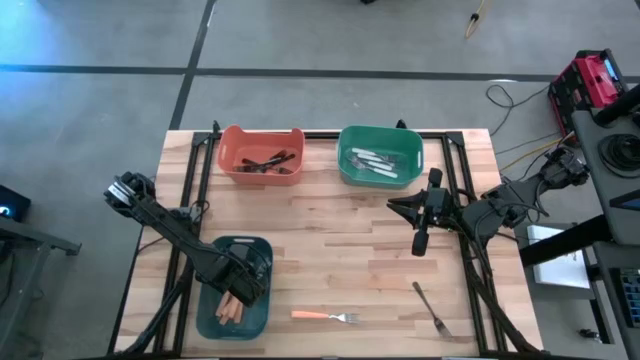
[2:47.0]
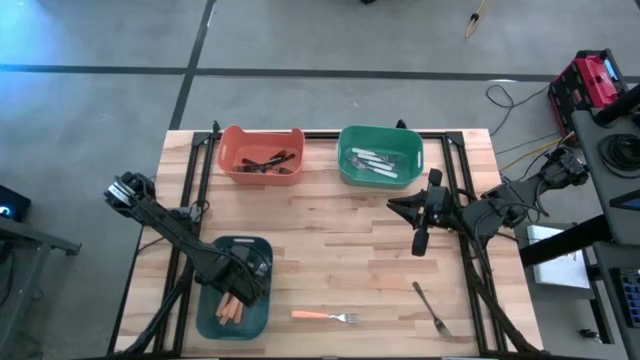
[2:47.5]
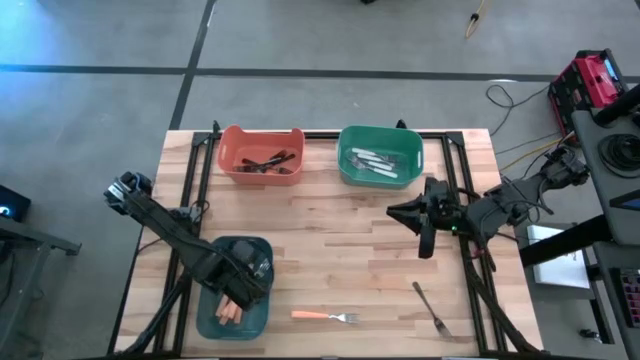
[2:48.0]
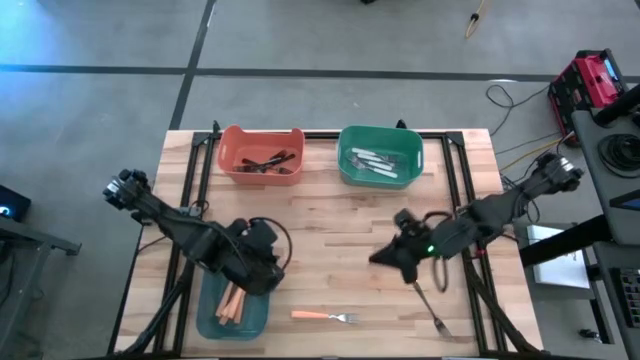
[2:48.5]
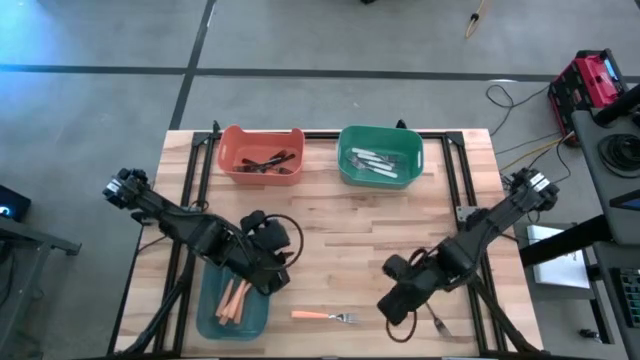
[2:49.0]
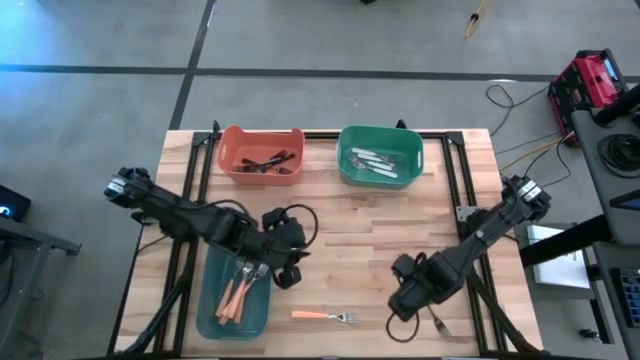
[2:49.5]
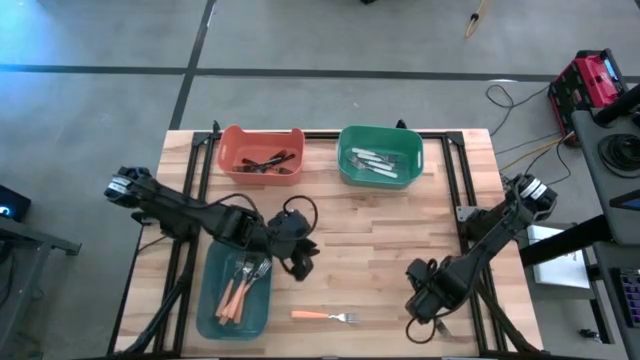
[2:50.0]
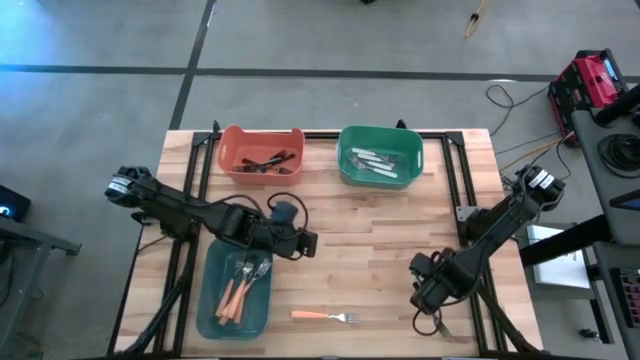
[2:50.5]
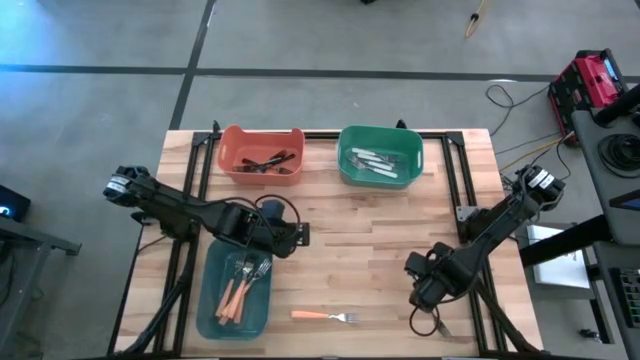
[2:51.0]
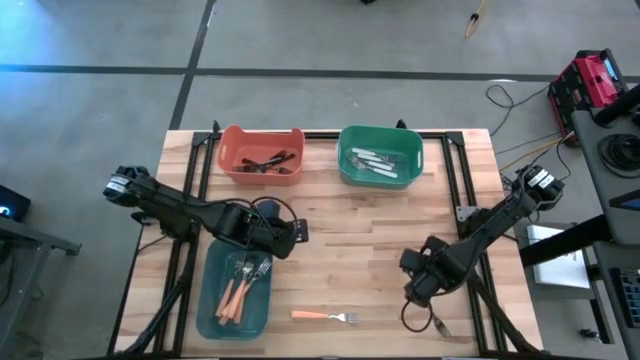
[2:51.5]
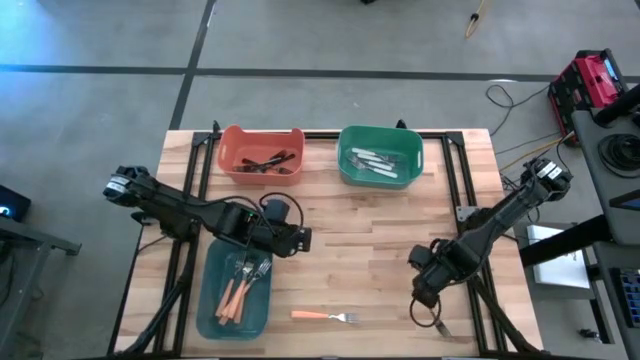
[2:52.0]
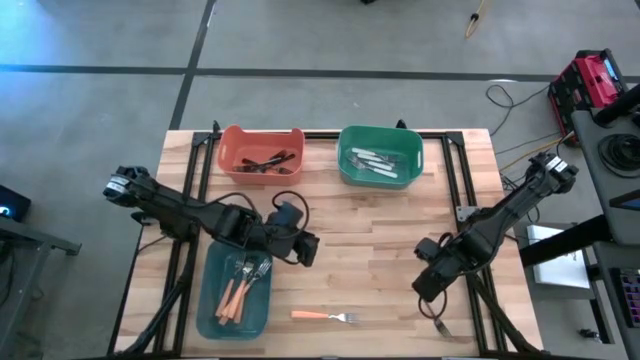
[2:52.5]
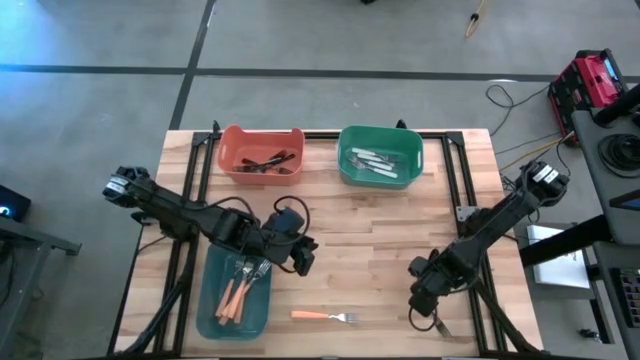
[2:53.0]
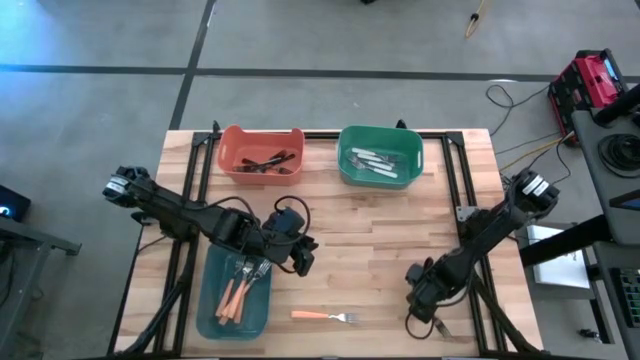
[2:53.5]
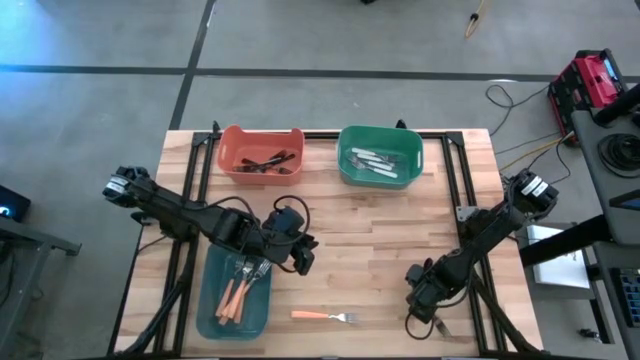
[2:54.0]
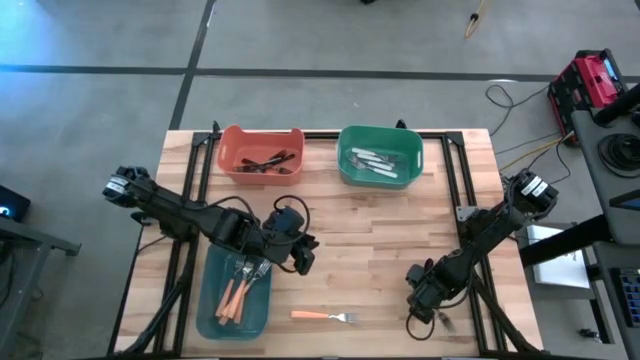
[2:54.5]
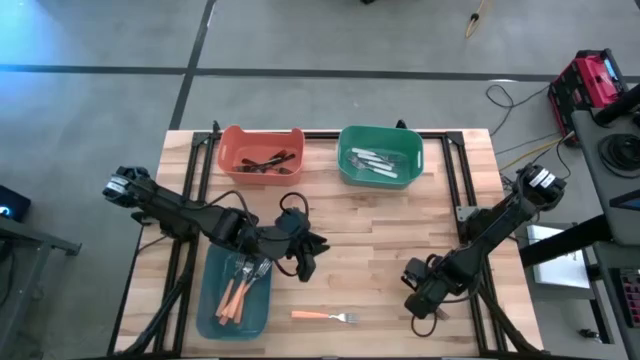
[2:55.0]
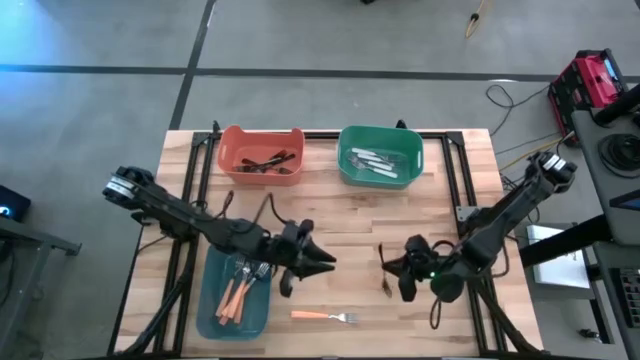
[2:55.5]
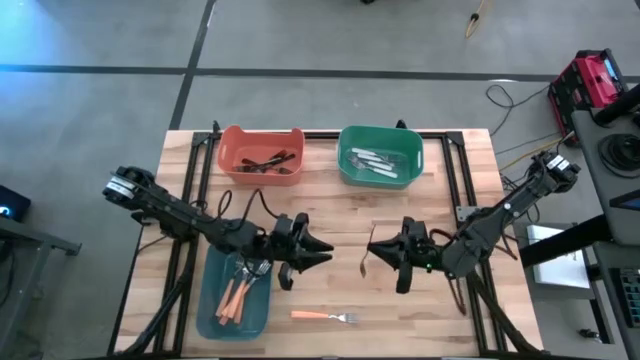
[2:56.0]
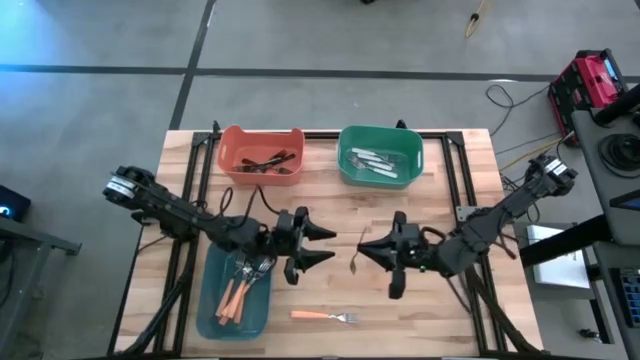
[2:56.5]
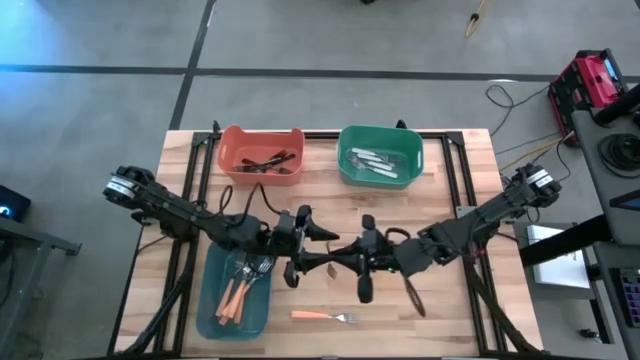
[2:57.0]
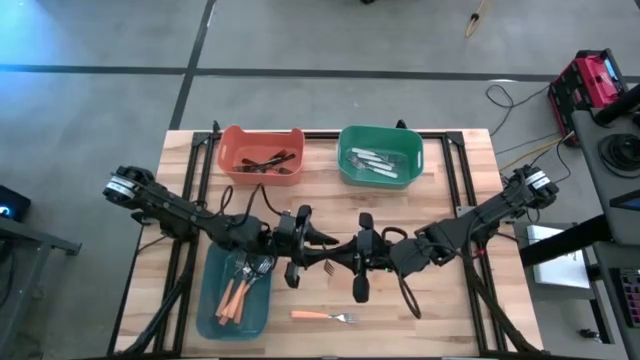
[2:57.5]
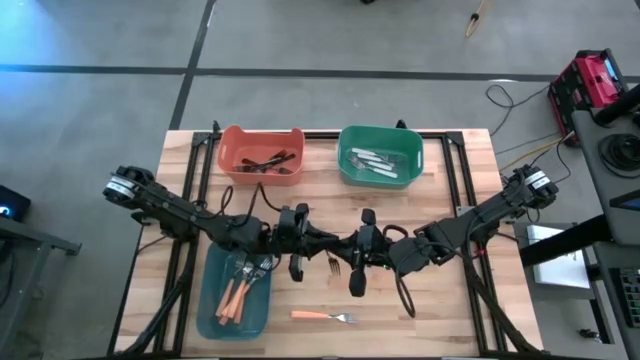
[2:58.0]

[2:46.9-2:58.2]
Task: Sort silverware by color (type)
Put the black fork into the orange bin

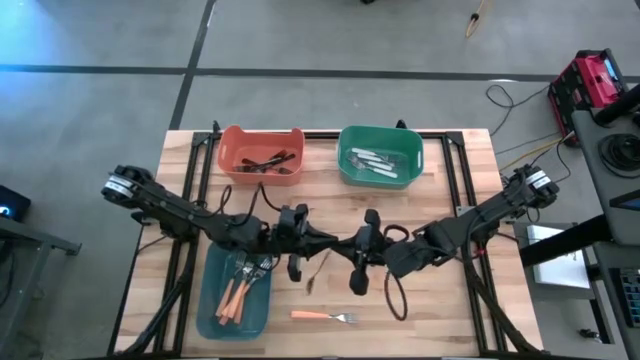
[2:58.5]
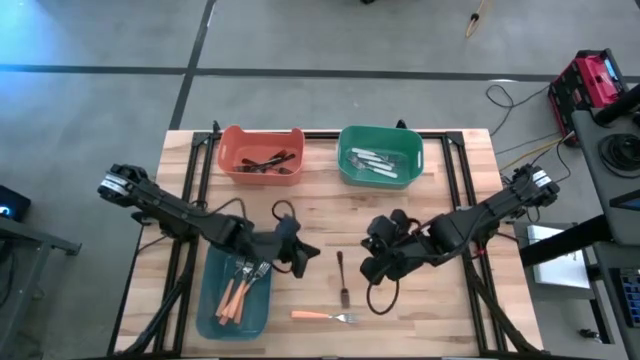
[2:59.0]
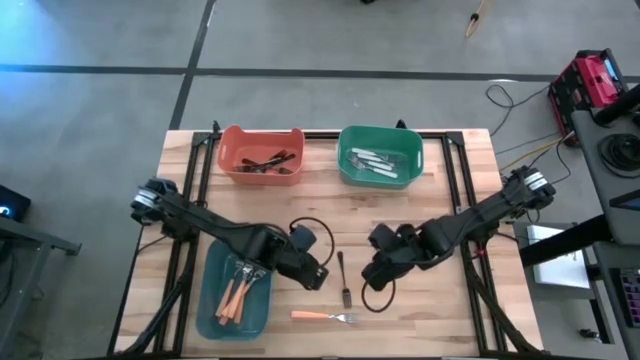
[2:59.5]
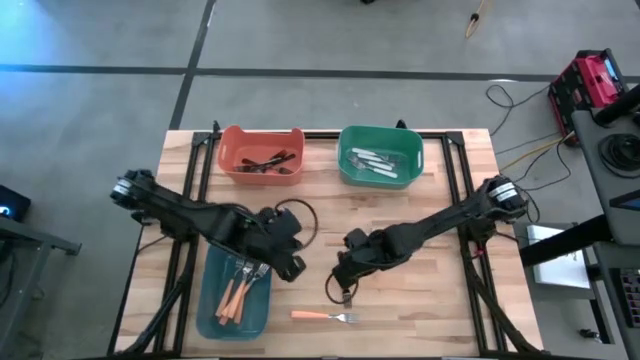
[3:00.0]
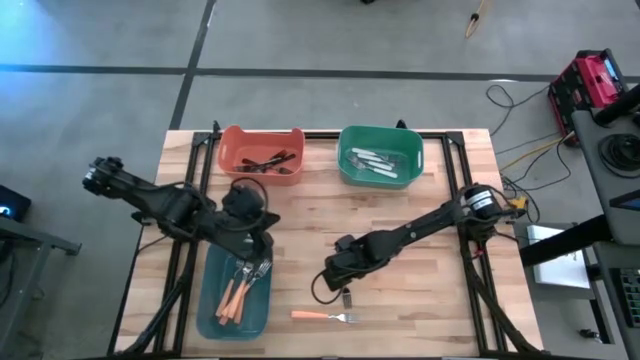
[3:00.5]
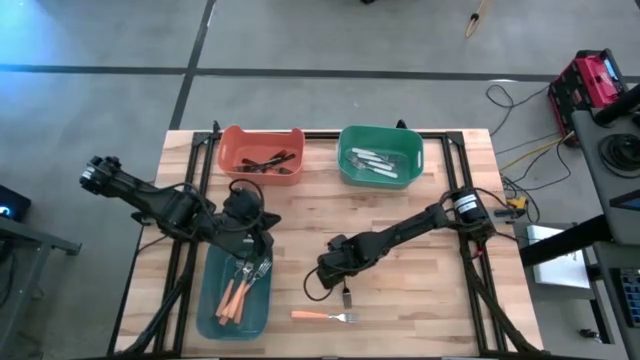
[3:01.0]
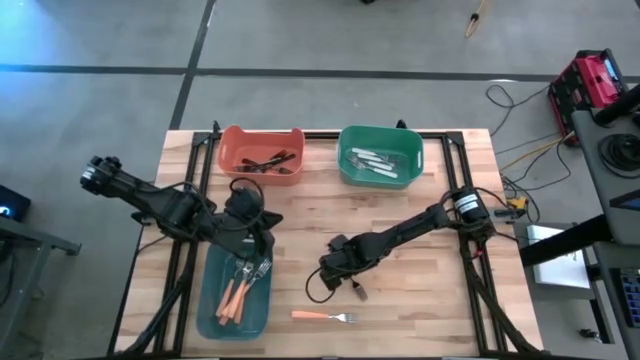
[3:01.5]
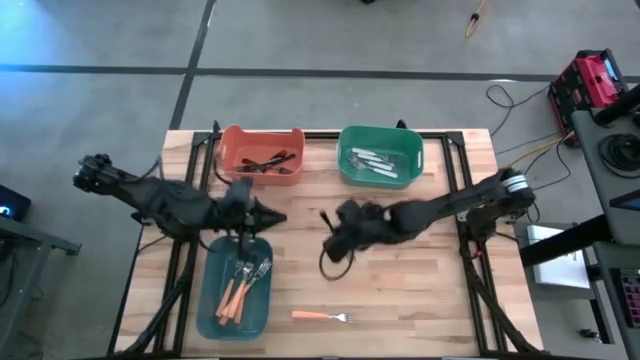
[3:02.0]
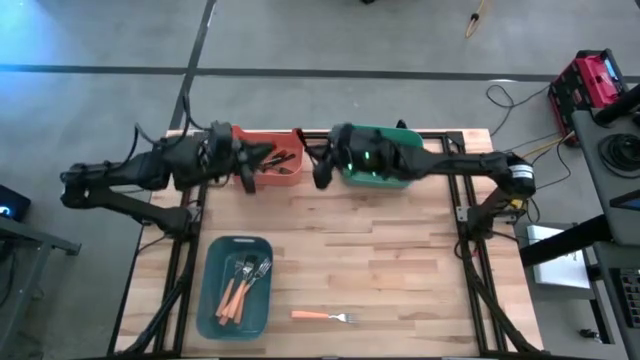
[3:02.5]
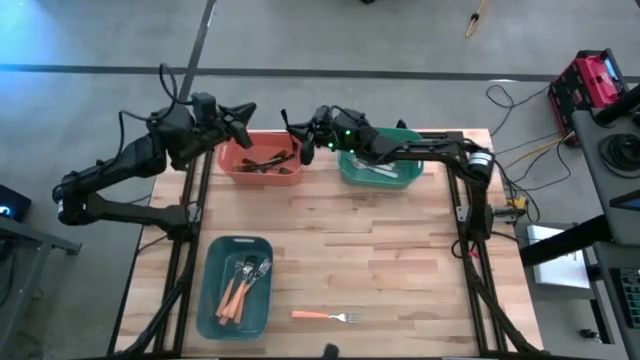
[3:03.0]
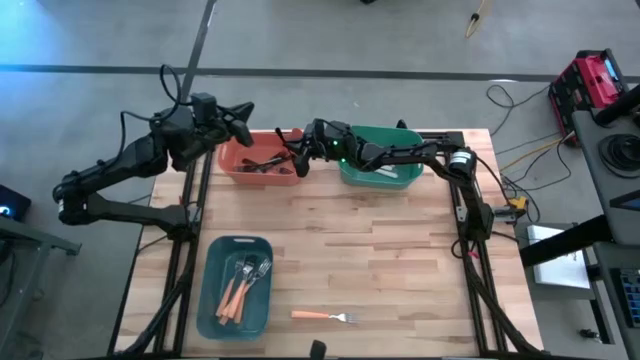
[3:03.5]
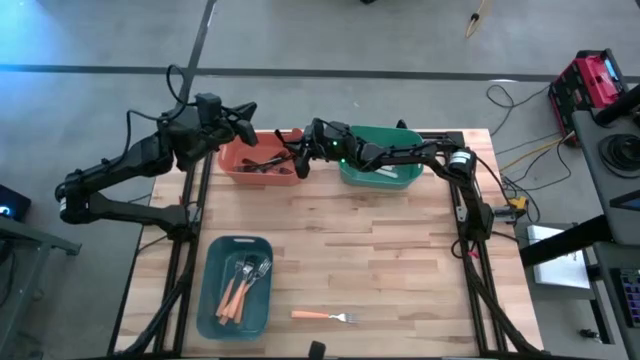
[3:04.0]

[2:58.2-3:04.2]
Put the black fork into the orange bin

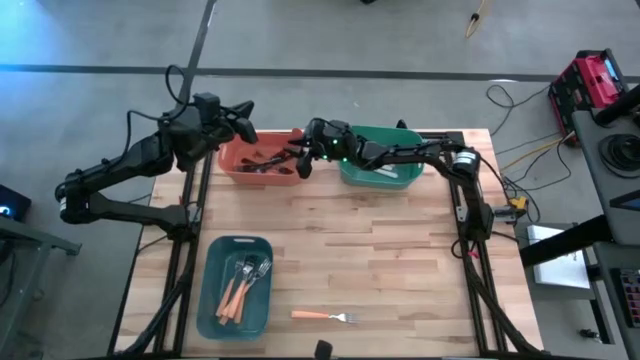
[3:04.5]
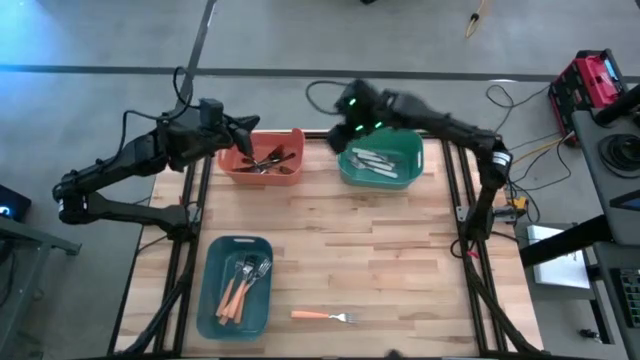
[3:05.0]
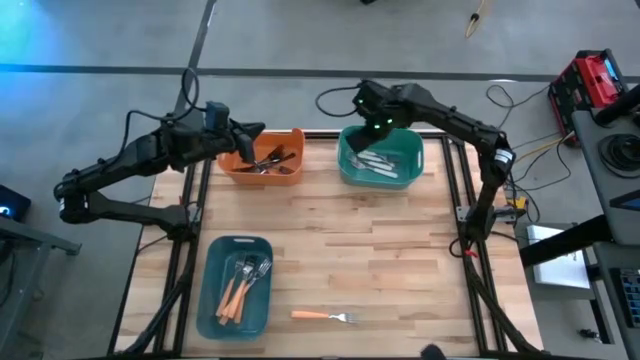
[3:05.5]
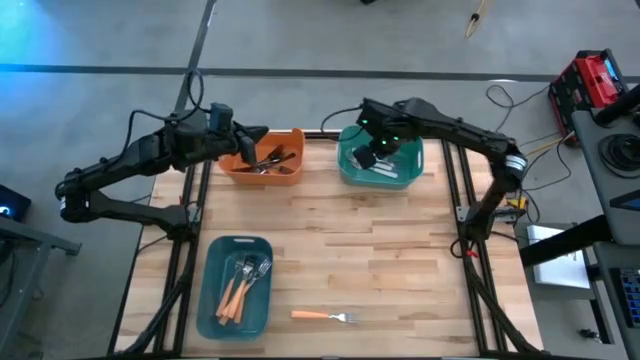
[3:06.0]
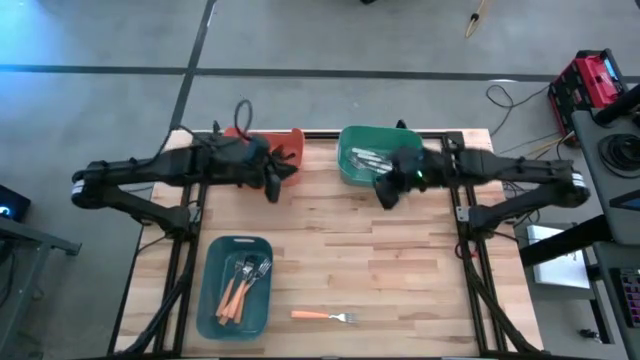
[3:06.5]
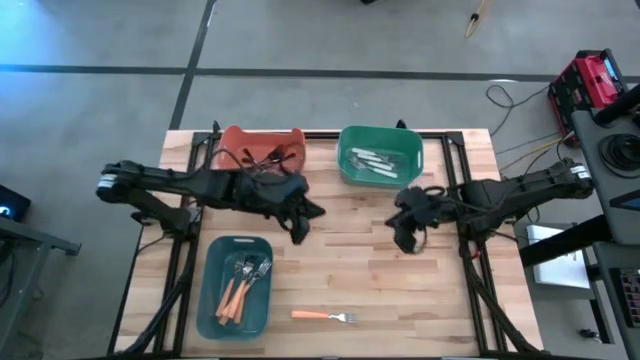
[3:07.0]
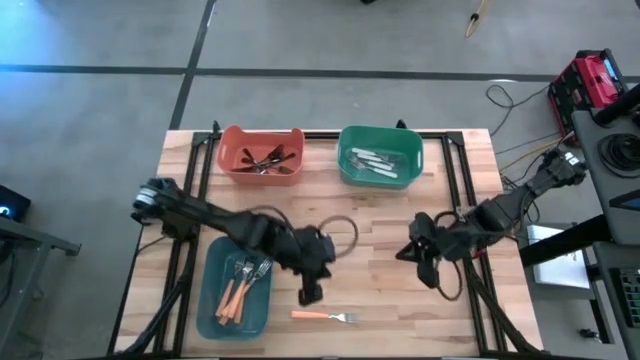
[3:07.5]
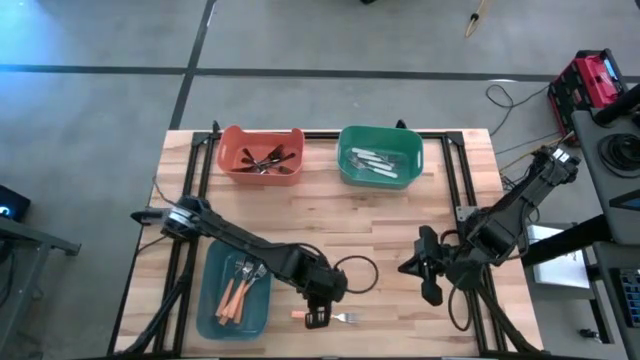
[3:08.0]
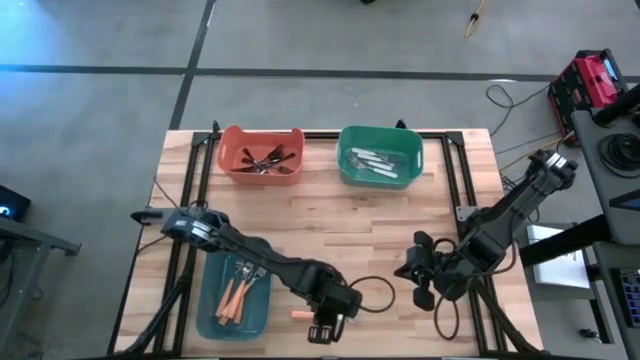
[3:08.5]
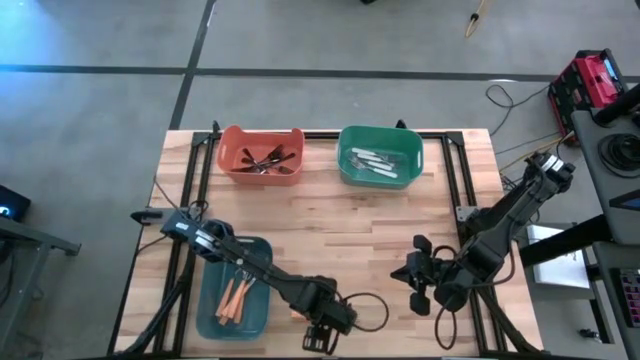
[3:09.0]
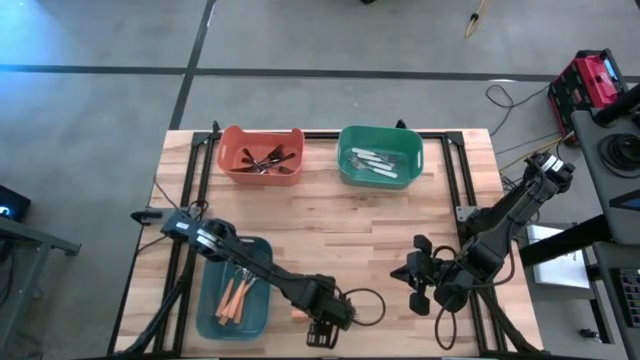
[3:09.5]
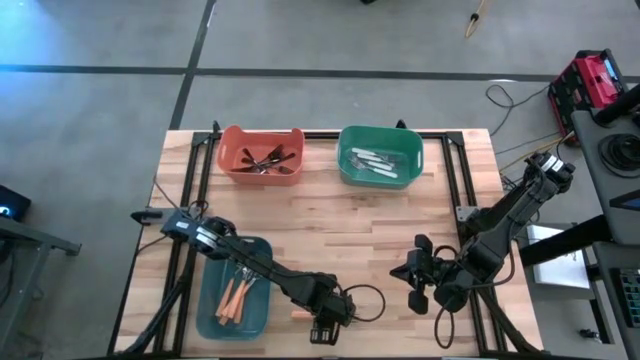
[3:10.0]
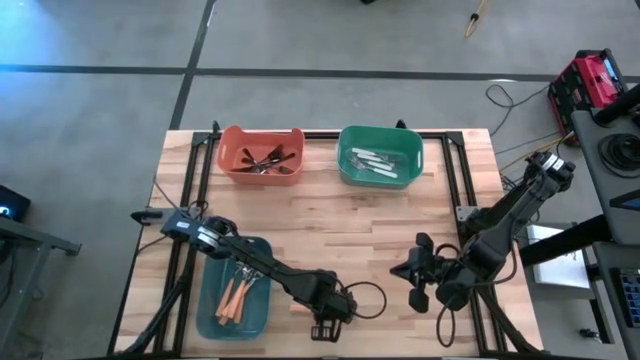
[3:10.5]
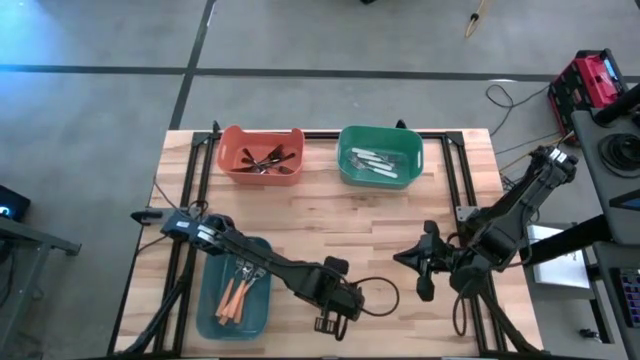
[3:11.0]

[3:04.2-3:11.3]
Put the orange fork into the blue-green bin
